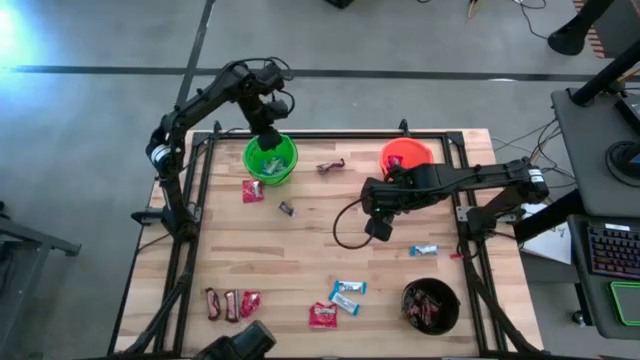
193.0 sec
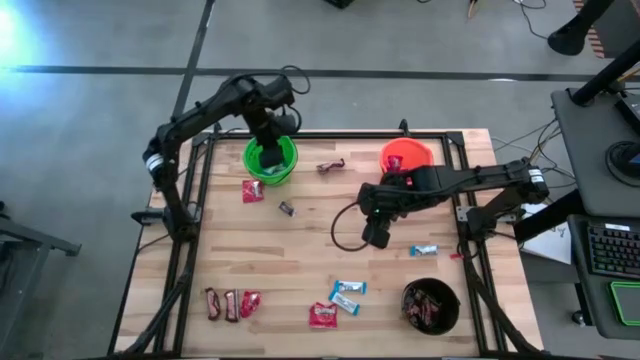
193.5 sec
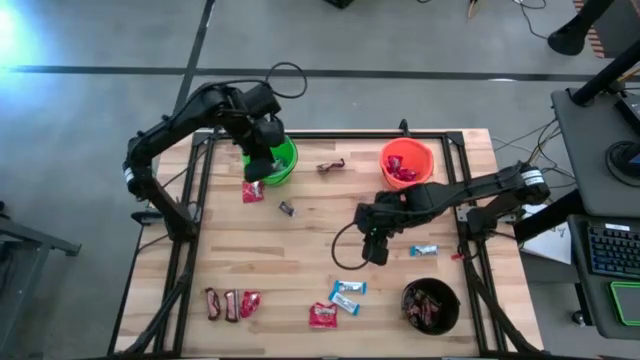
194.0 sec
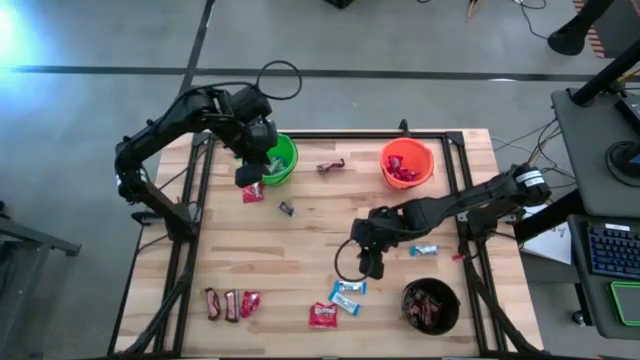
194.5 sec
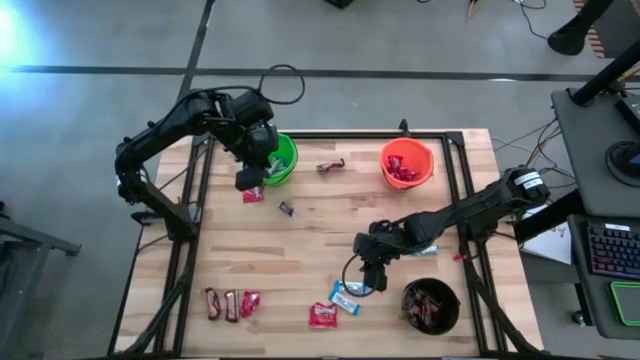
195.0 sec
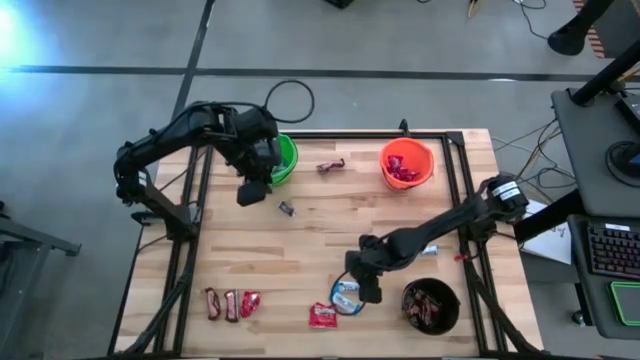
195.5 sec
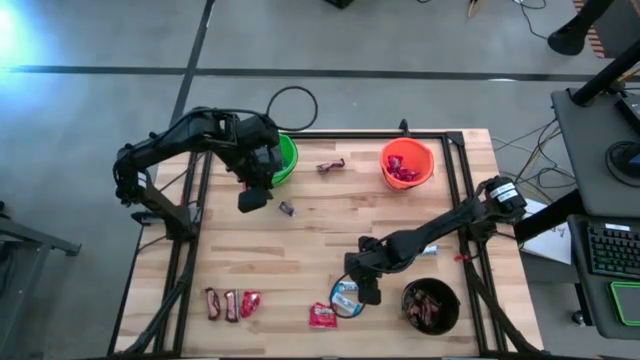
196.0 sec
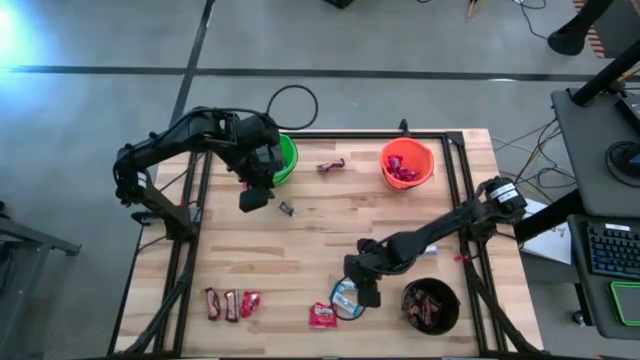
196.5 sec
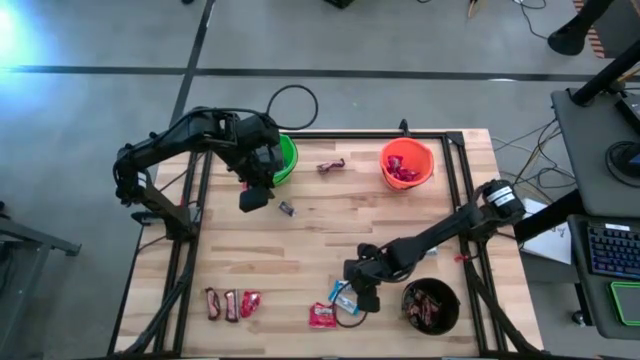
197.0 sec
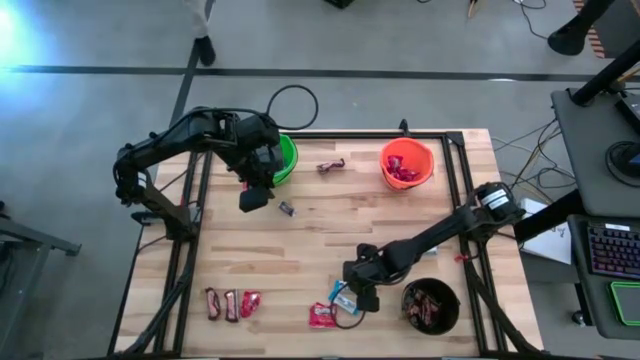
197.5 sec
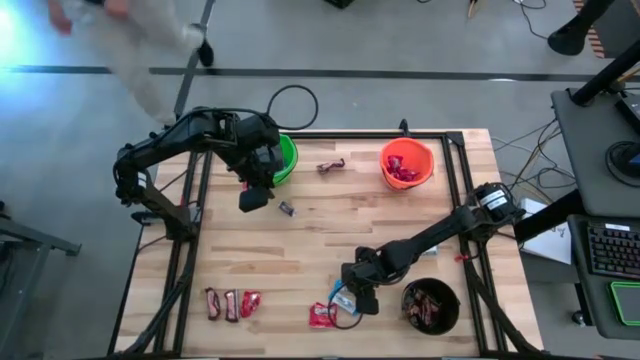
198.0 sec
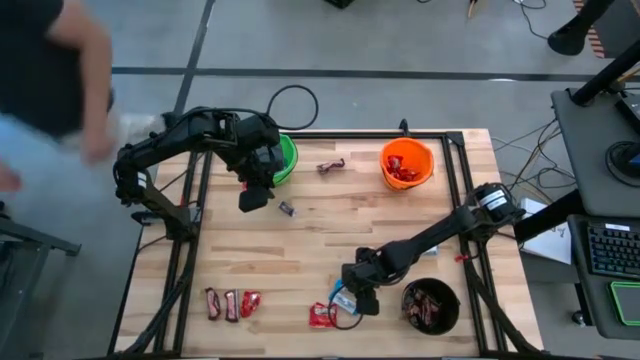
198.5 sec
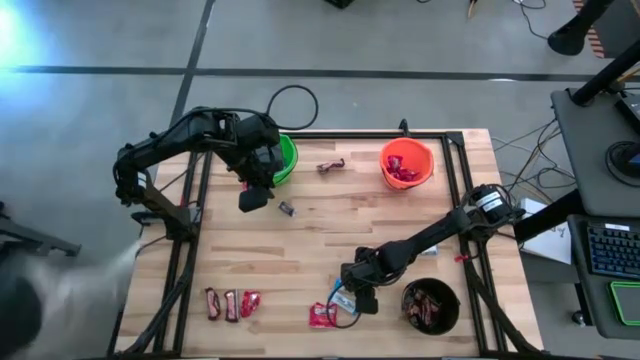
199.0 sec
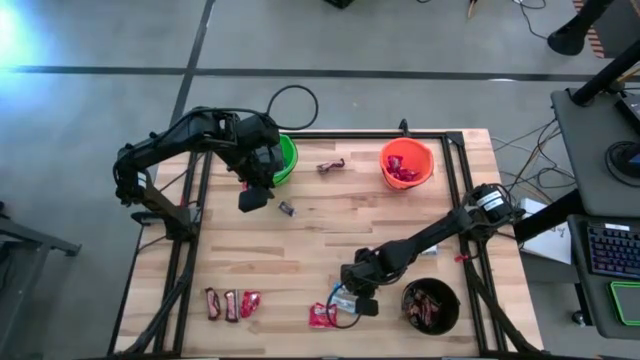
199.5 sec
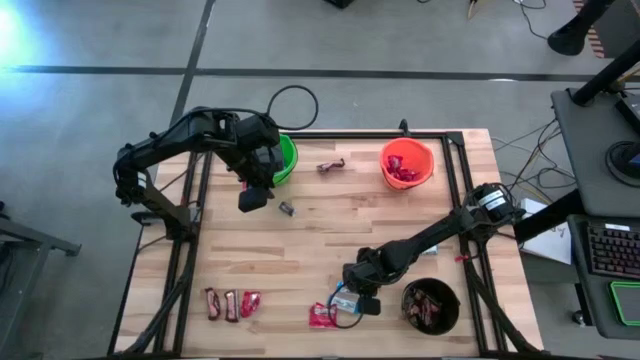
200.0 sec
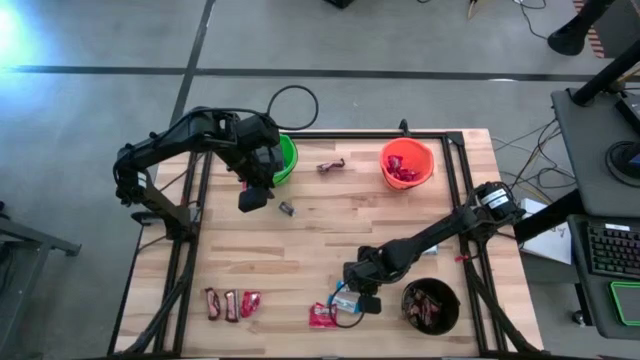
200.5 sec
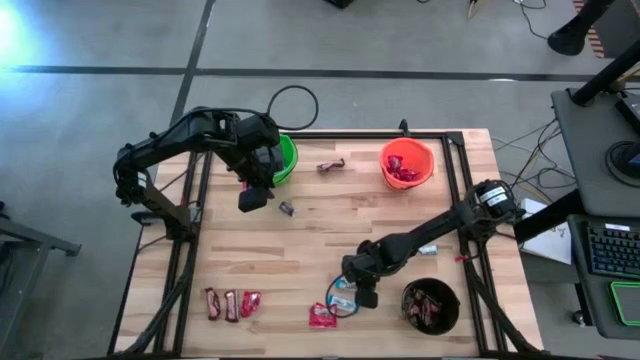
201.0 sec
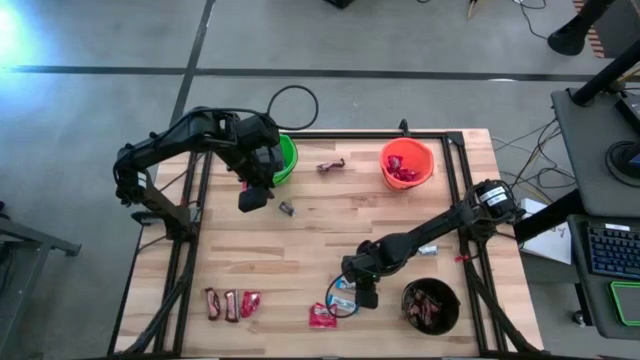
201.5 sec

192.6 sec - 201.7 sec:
Task: Sort candy
Put the white candy into the green bucket

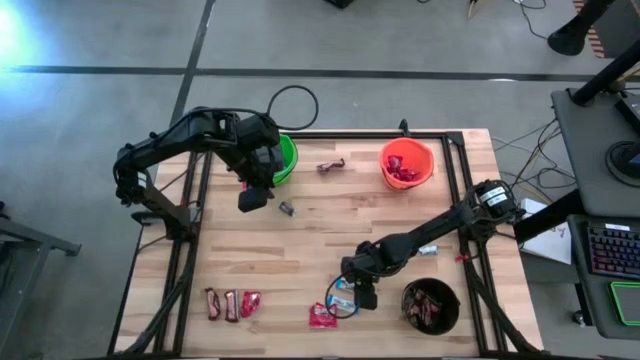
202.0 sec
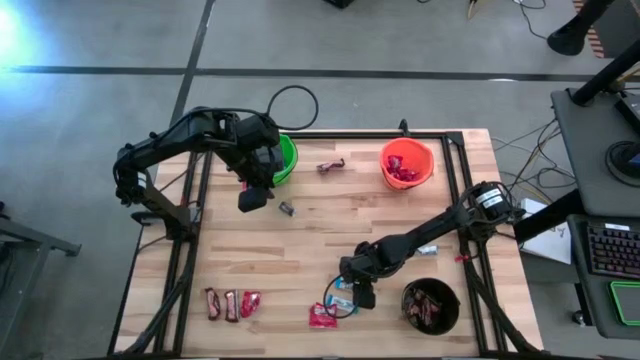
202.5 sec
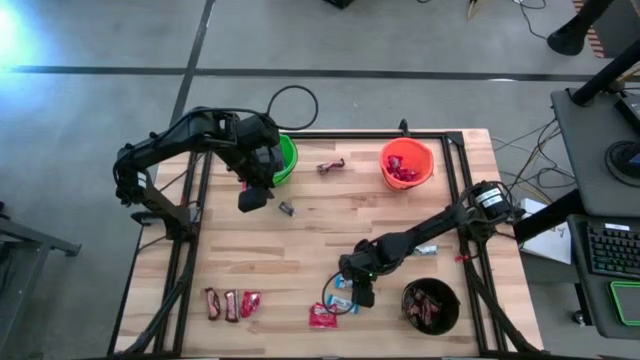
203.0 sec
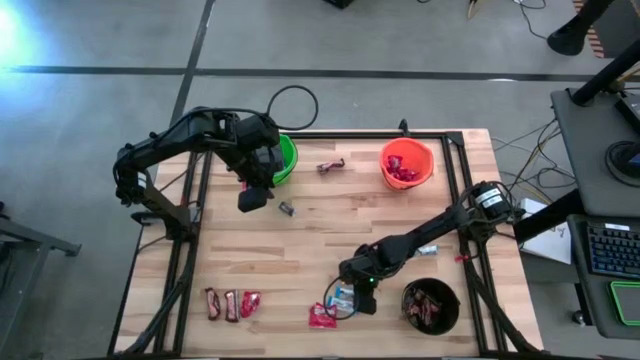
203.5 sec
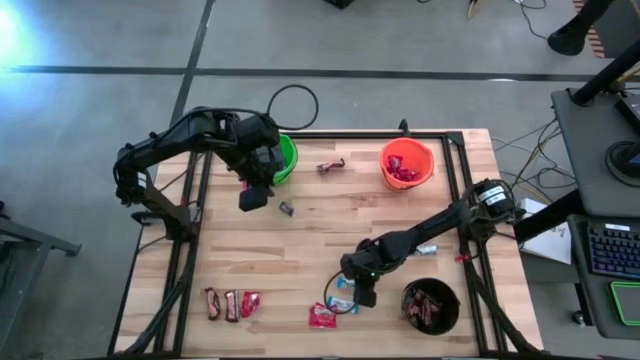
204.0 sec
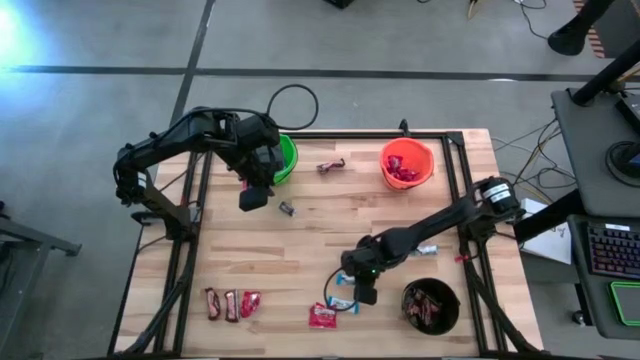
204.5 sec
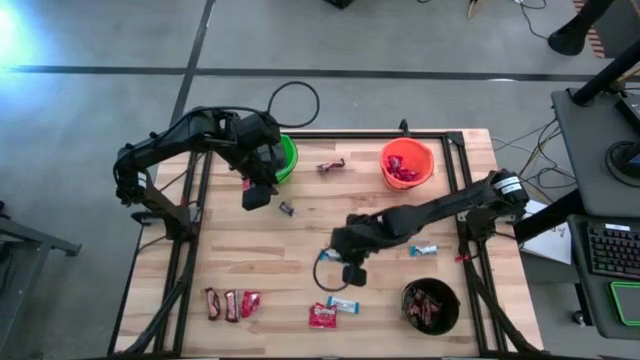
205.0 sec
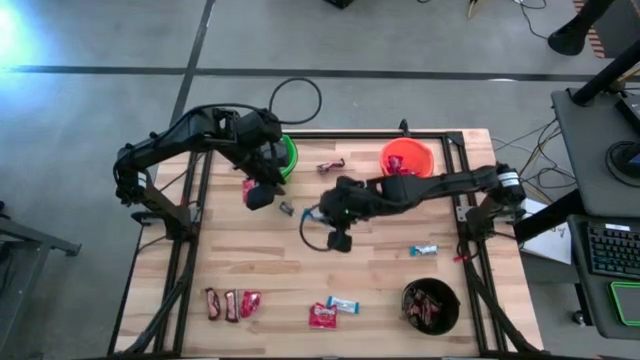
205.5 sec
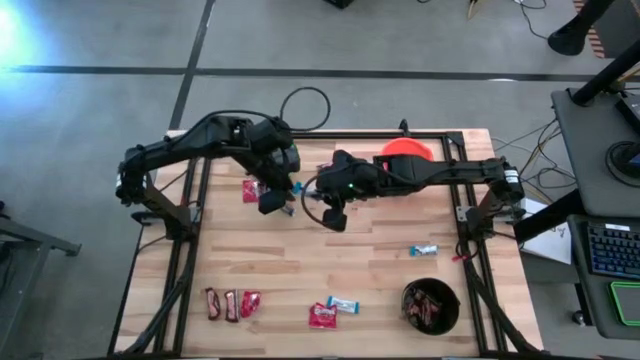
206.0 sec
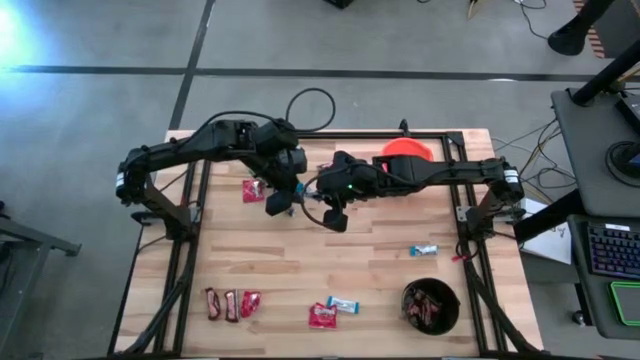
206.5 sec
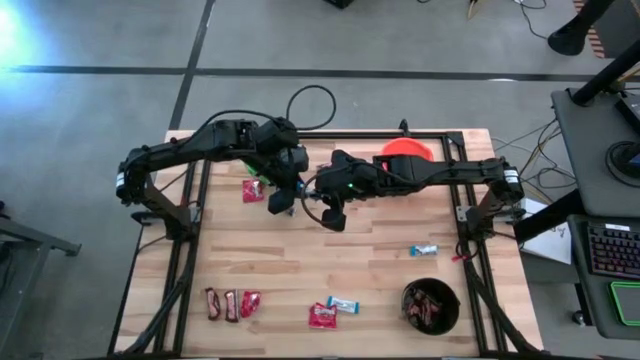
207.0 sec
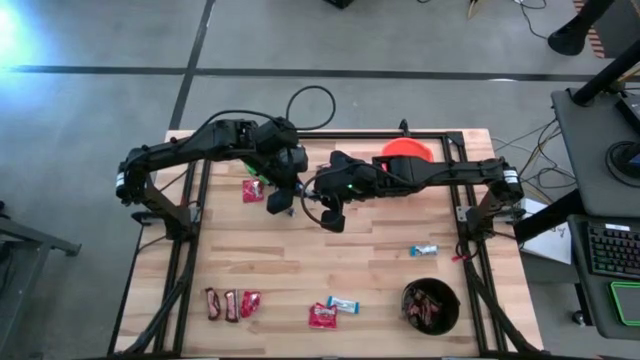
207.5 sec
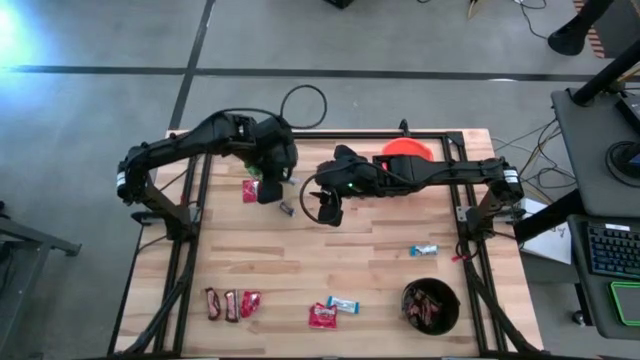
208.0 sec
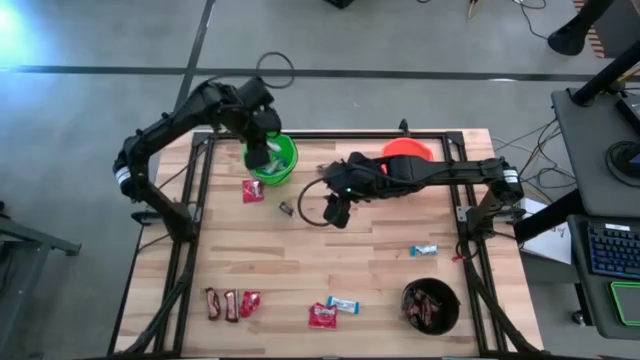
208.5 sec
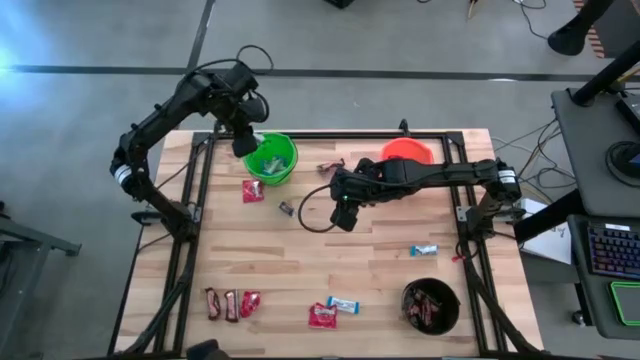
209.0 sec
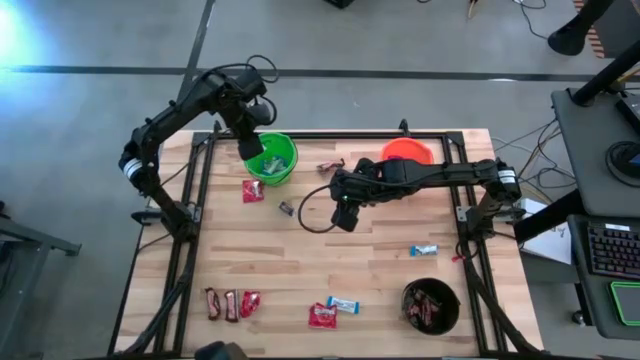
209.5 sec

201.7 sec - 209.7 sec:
Put the white candy into the green bucket

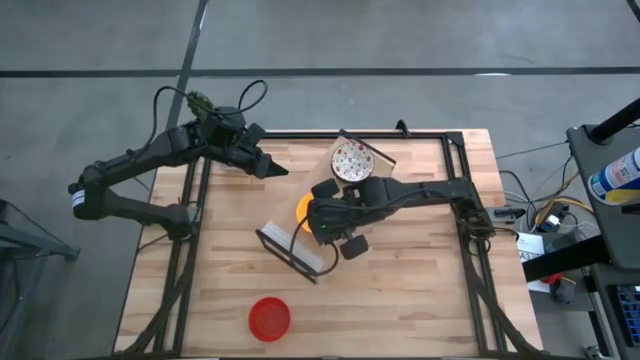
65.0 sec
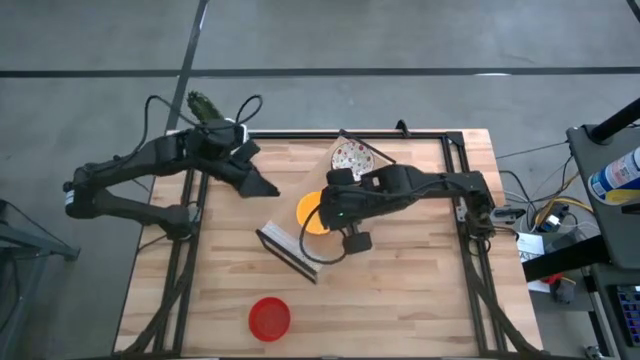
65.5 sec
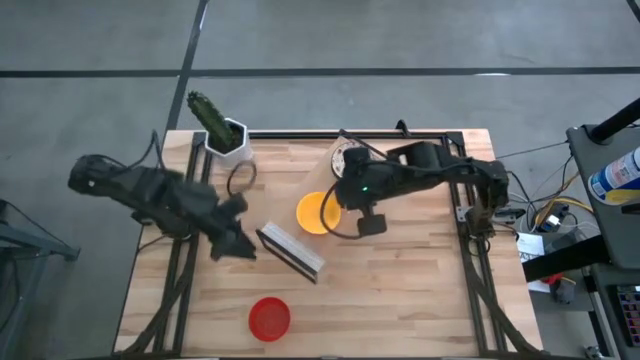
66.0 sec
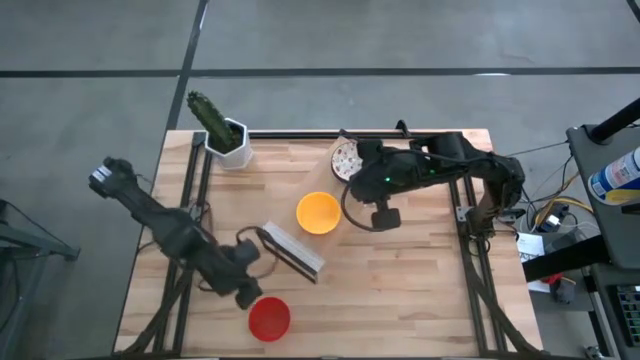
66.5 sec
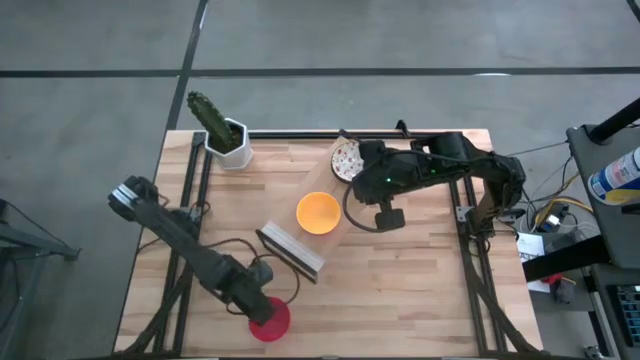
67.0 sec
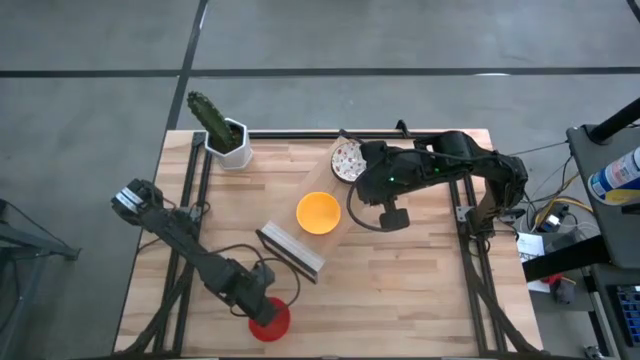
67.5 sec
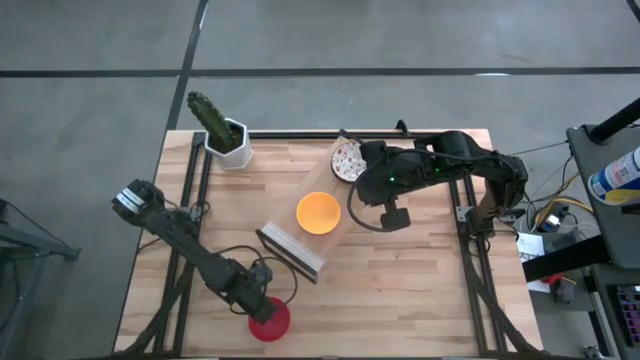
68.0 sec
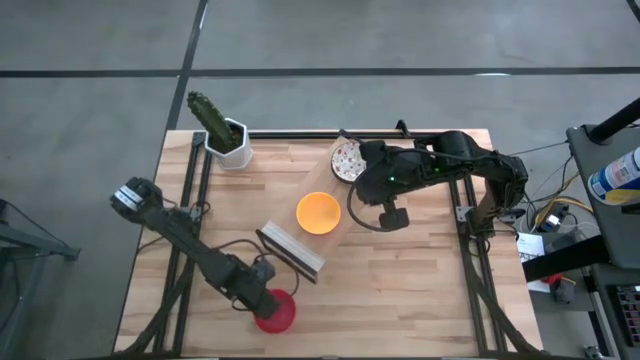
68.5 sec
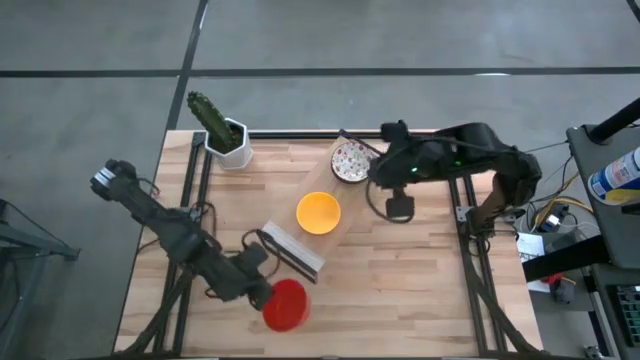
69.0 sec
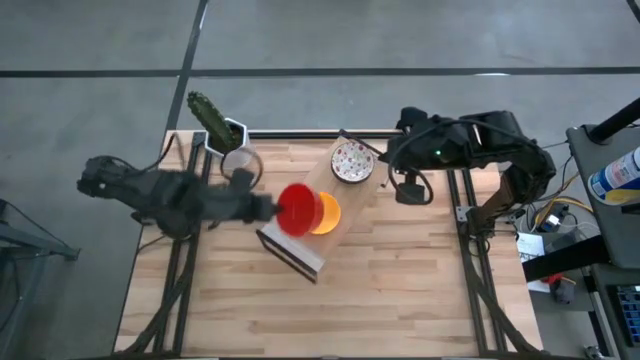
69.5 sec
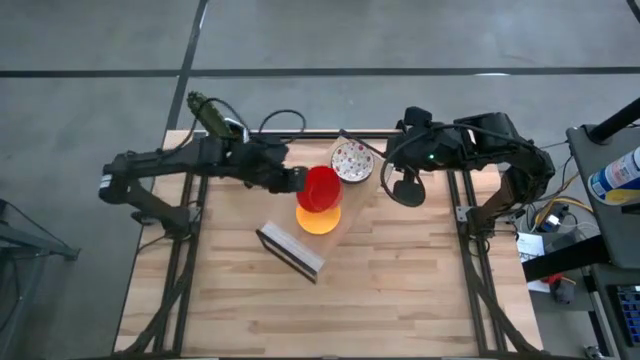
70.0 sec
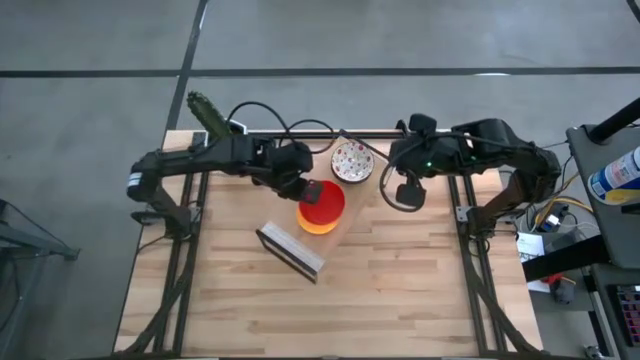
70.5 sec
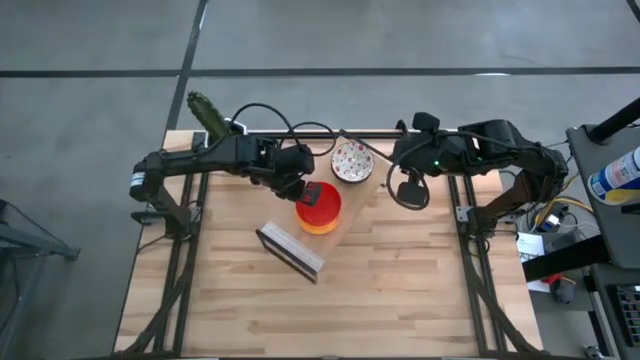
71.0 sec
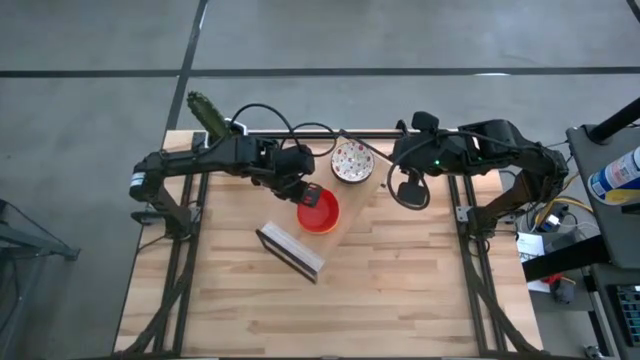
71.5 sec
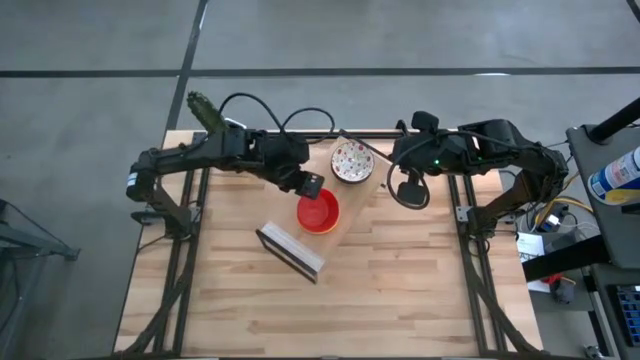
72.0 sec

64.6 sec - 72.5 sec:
Task: Pick & Place Mini bowls
Stack the red bowl on the top of the yellow bowl on the shelf
